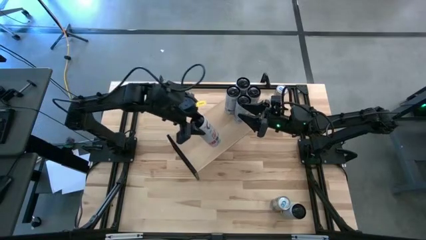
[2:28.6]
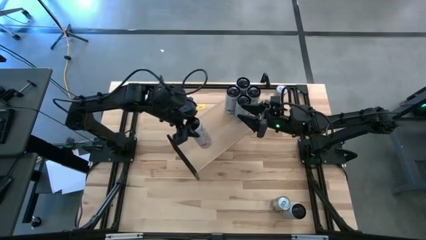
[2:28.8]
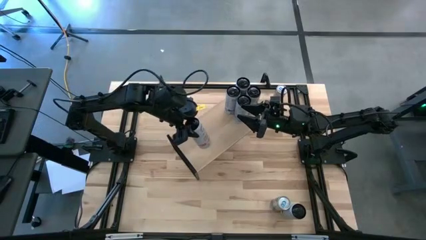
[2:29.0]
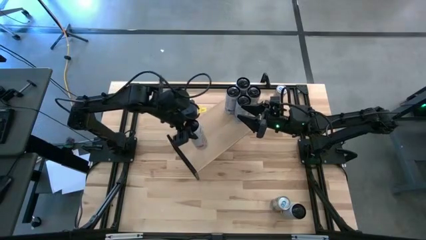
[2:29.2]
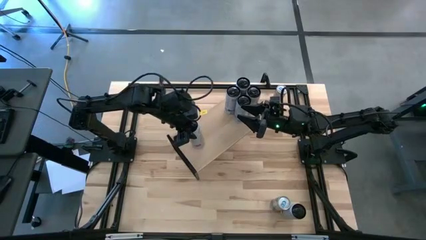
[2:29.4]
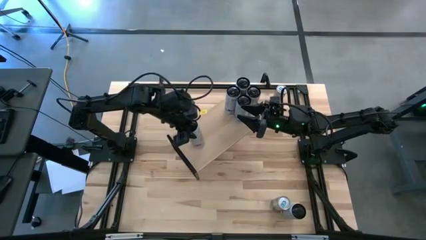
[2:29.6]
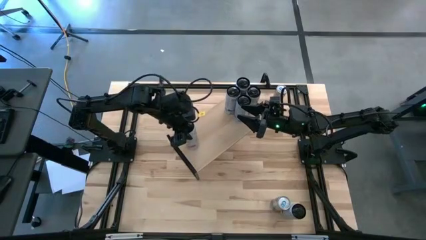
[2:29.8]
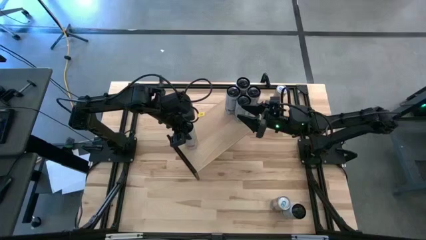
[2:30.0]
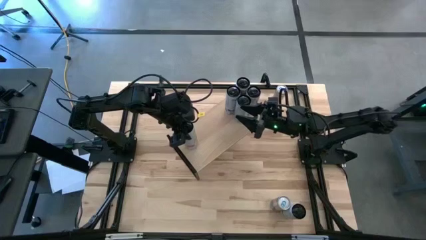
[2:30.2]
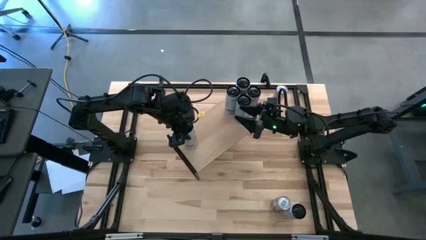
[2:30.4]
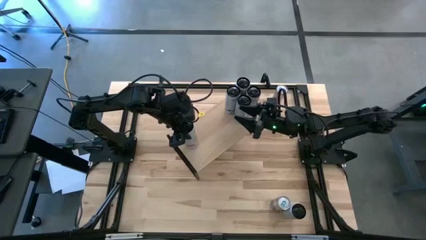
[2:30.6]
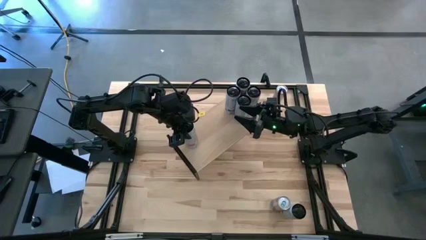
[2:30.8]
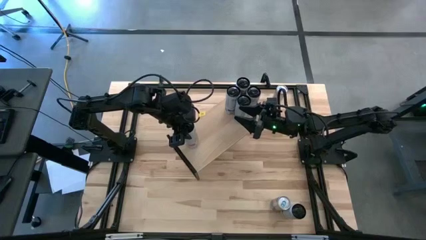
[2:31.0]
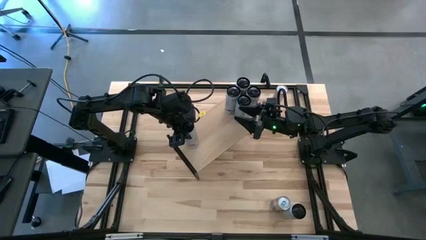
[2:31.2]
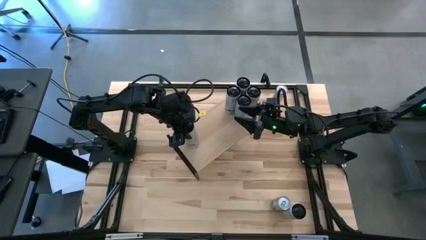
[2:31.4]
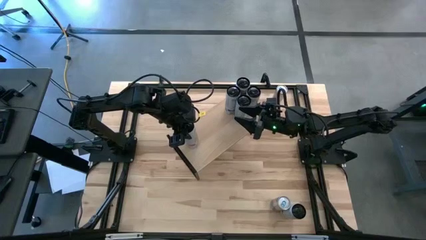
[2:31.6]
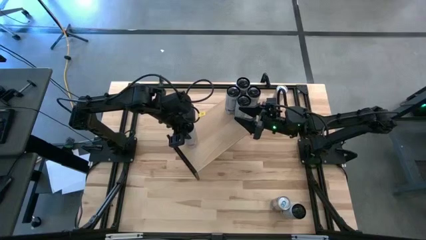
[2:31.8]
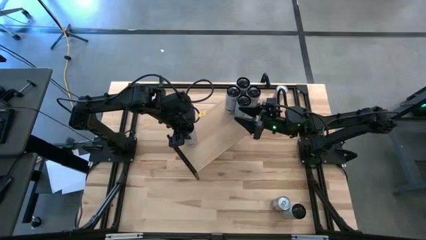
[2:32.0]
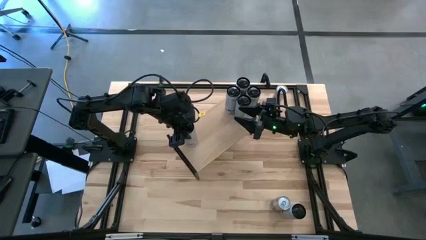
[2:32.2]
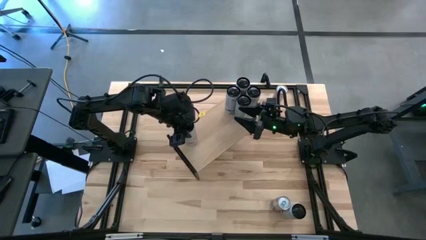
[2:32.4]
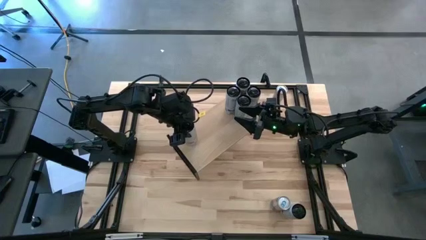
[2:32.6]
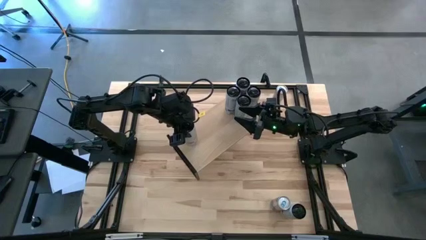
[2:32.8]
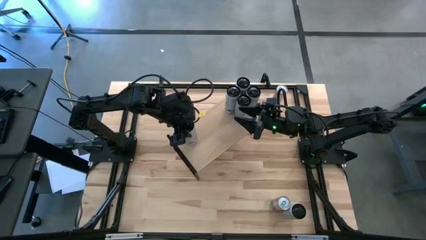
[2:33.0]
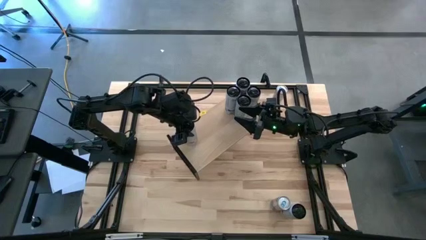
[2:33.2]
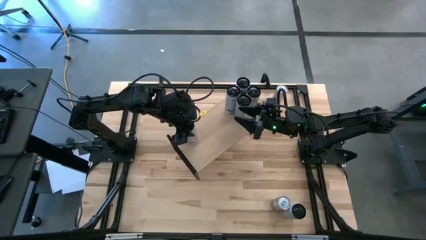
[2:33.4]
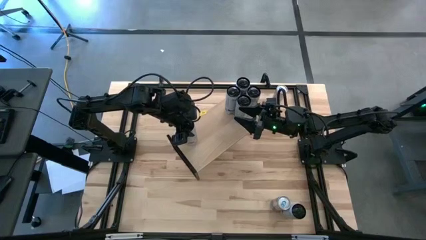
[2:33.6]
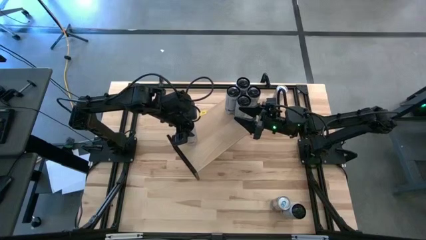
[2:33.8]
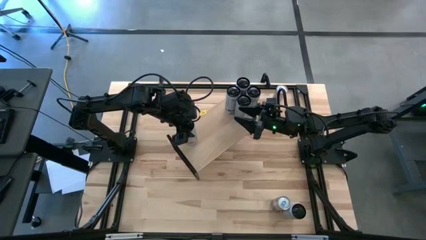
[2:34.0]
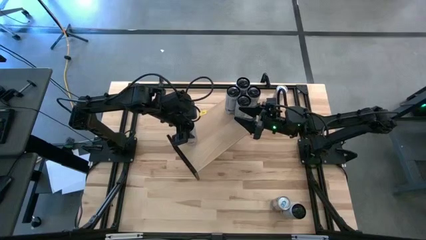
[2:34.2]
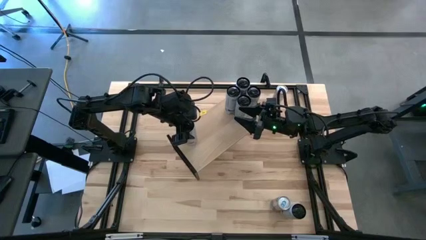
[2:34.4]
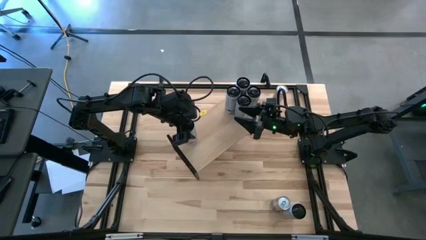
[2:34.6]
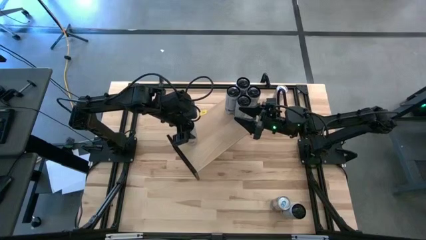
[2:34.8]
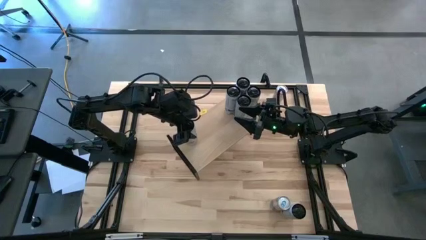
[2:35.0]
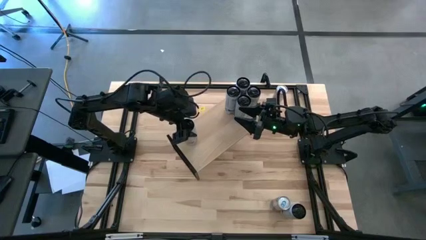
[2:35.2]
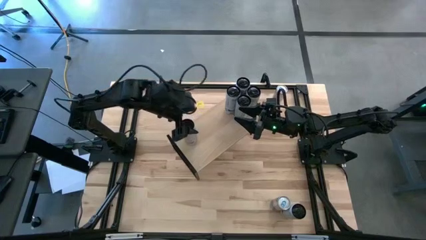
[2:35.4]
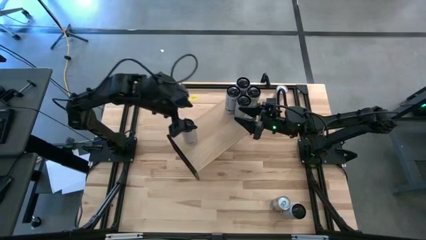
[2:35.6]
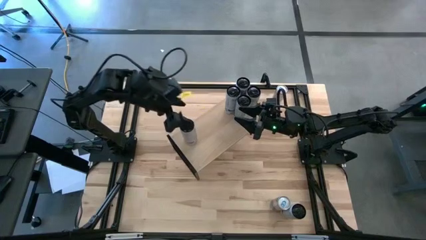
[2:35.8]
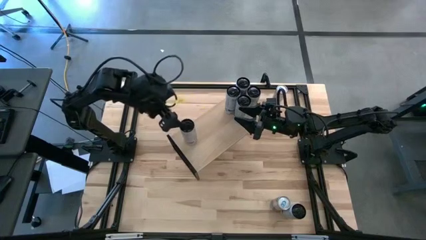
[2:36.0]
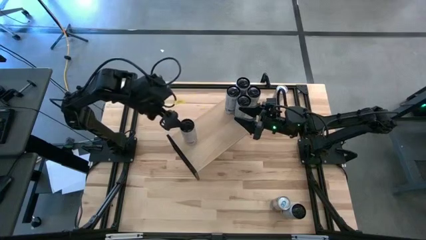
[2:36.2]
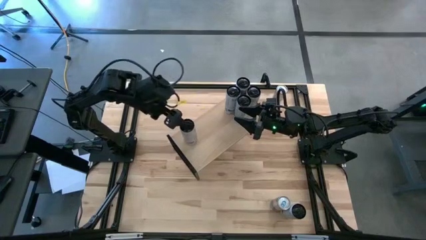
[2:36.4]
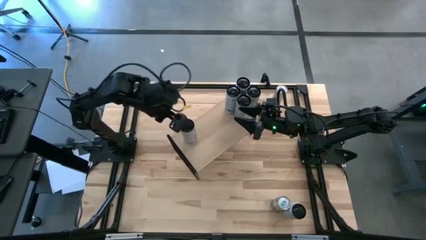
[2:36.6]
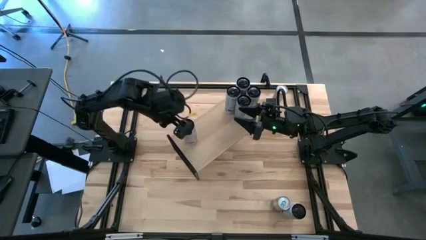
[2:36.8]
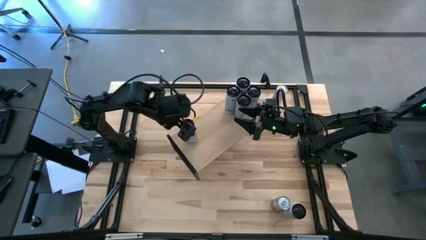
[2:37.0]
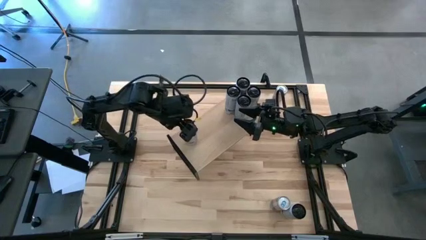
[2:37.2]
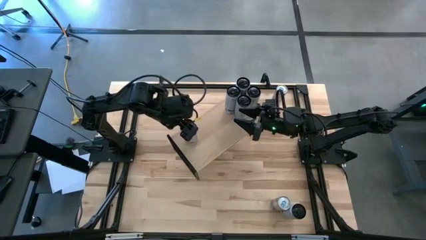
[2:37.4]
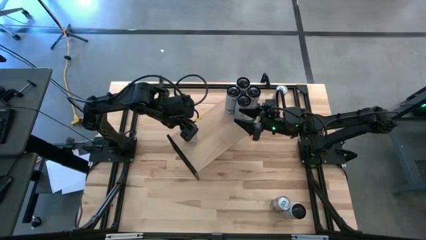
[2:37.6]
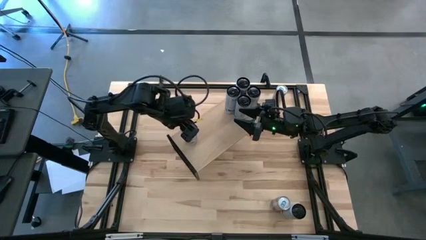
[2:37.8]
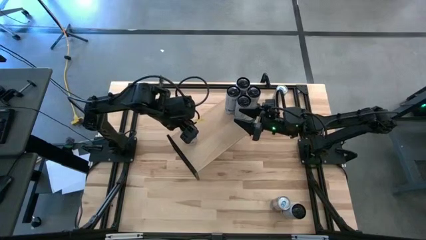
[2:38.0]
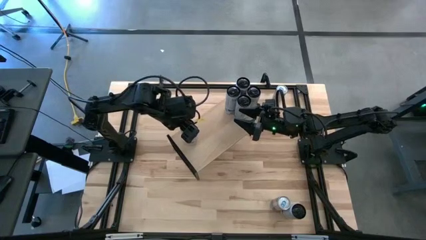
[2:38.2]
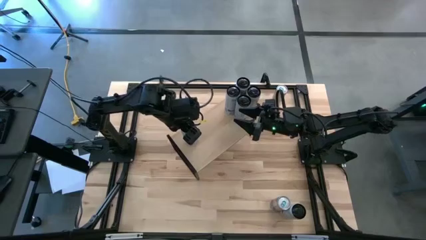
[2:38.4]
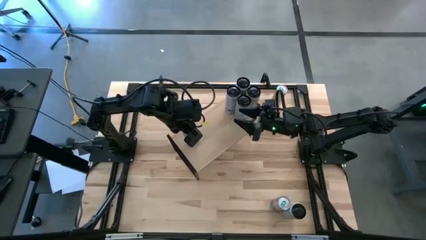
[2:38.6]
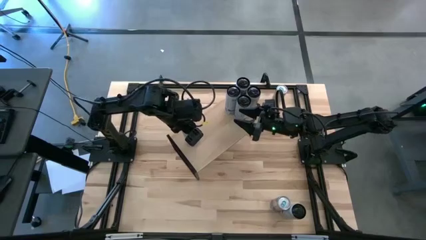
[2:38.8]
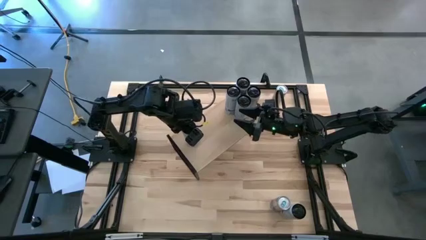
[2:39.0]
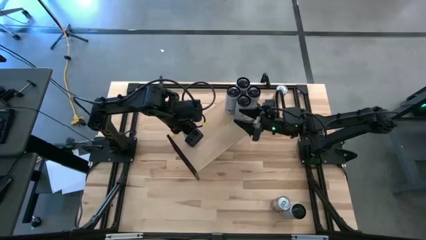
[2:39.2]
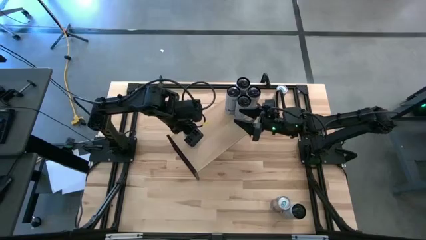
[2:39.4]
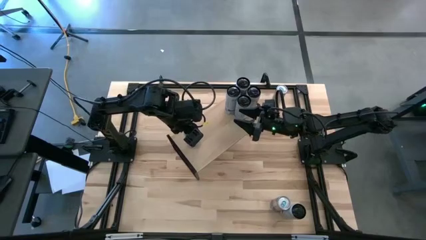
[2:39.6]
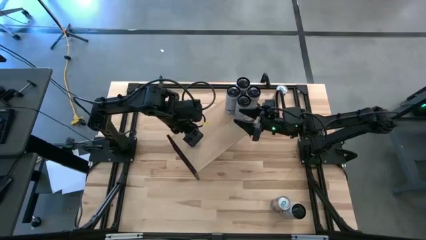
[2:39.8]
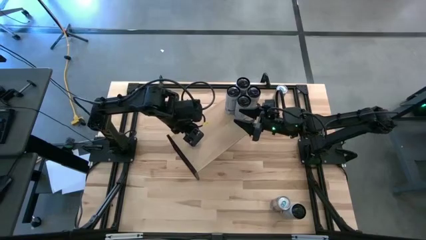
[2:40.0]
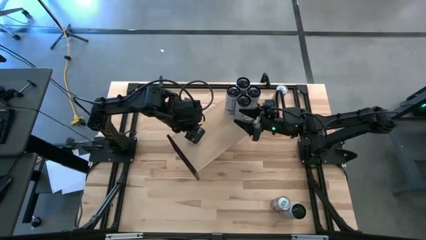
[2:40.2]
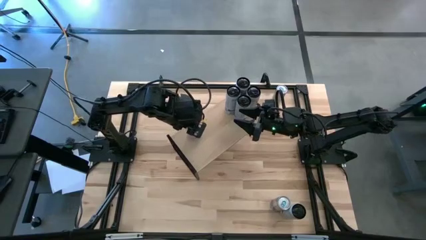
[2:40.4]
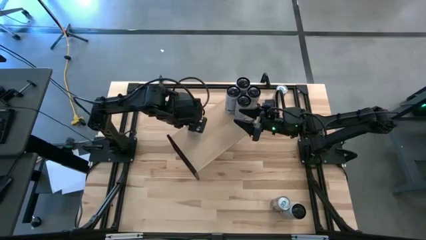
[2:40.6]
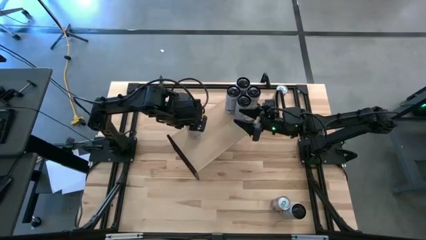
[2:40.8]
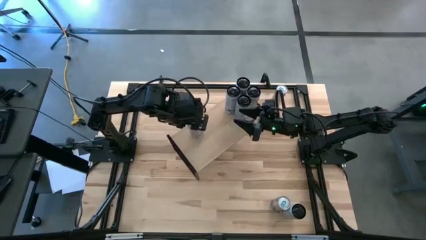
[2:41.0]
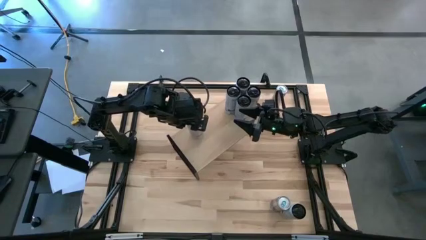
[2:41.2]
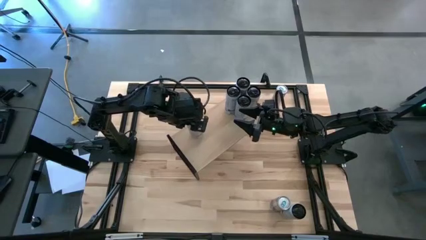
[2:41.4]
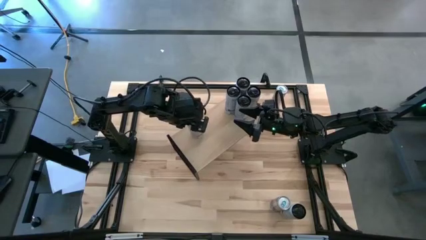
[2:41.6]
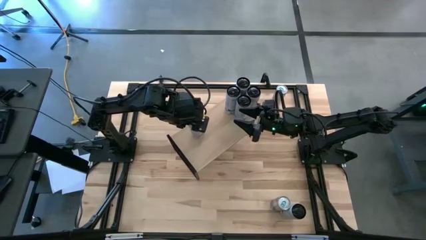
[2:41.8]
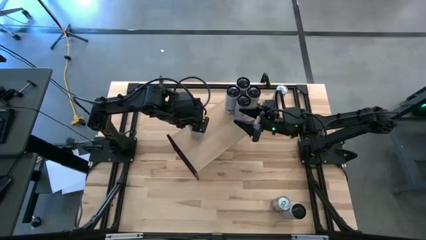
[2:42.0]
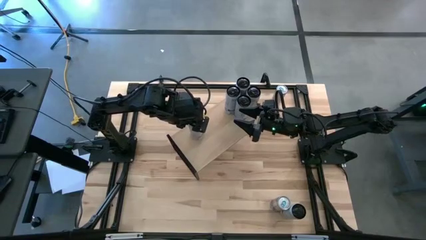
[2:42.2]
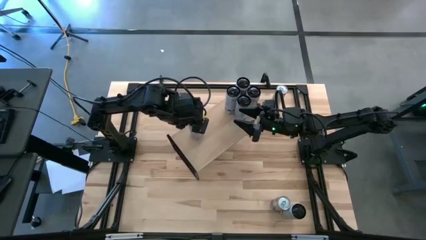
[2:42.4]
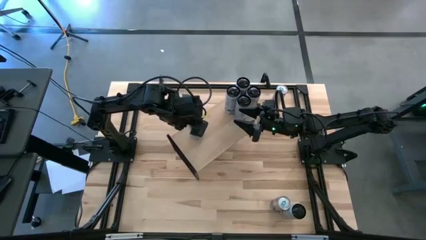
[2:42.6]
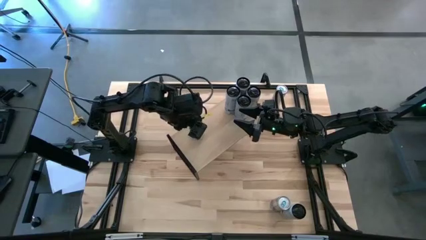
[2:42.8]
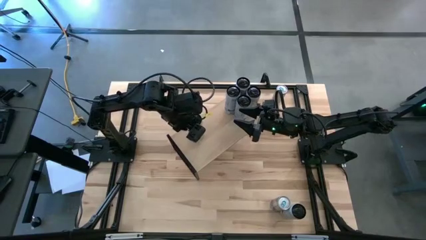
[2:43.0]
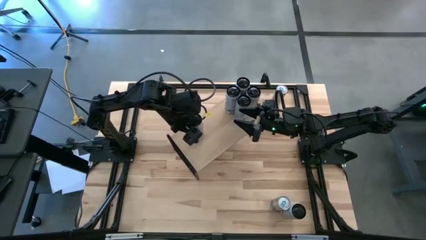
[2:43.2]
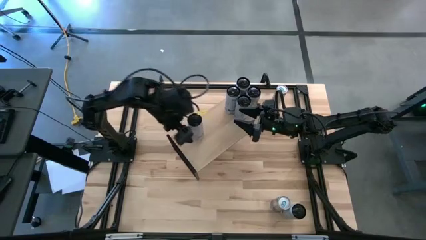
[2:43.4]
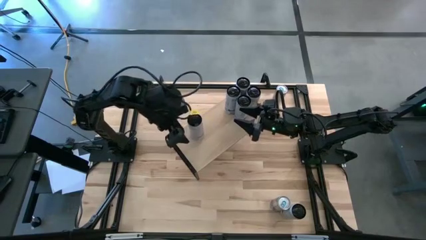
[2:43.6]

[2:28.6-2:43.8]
Task: Place canned beverage on shelf
Put the top white-pink soda can on the shelf
